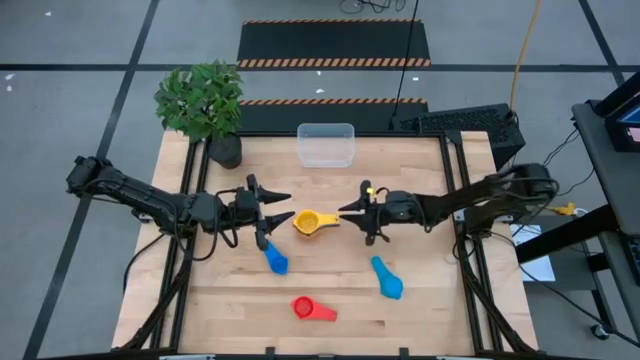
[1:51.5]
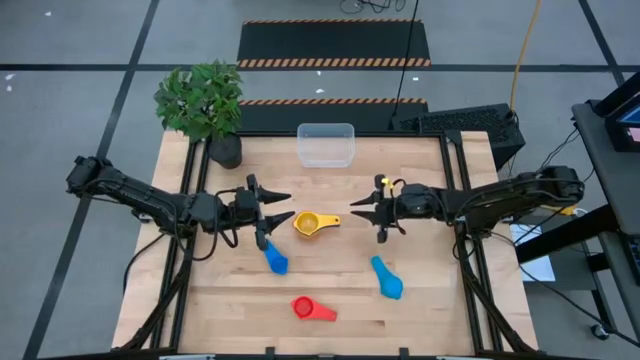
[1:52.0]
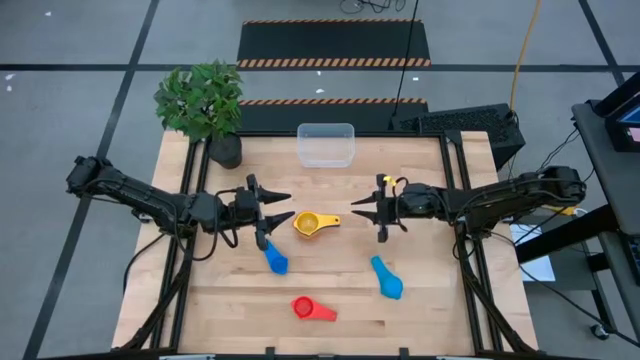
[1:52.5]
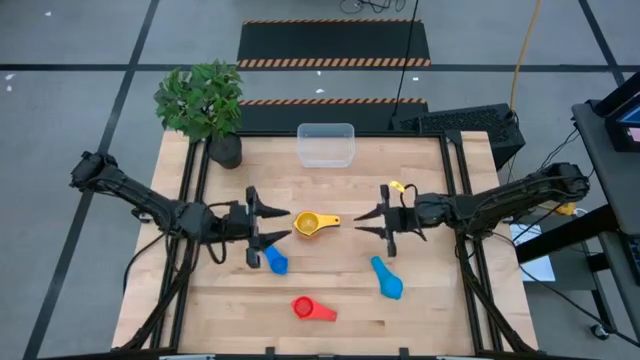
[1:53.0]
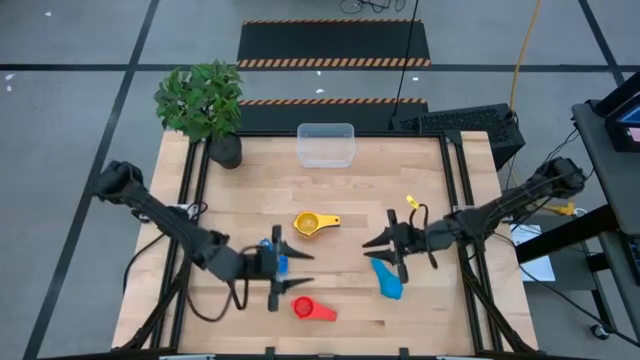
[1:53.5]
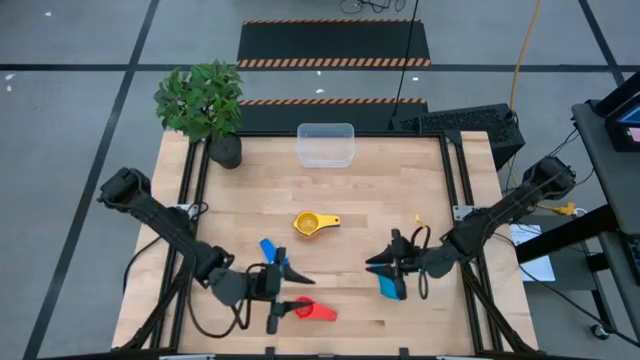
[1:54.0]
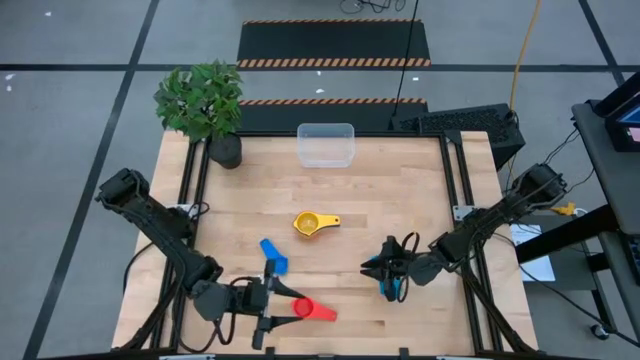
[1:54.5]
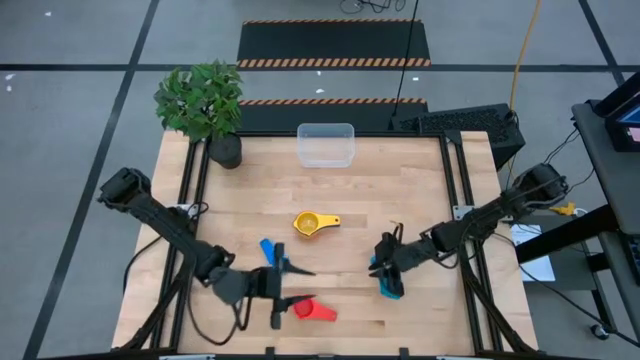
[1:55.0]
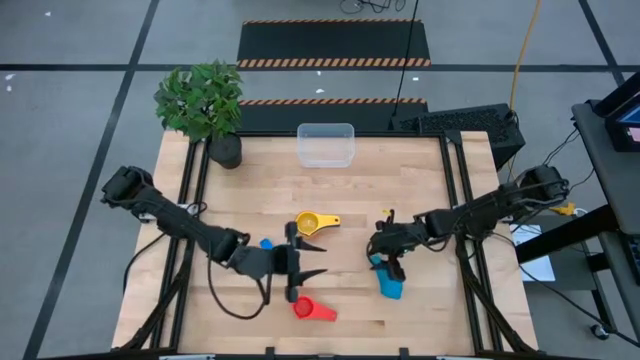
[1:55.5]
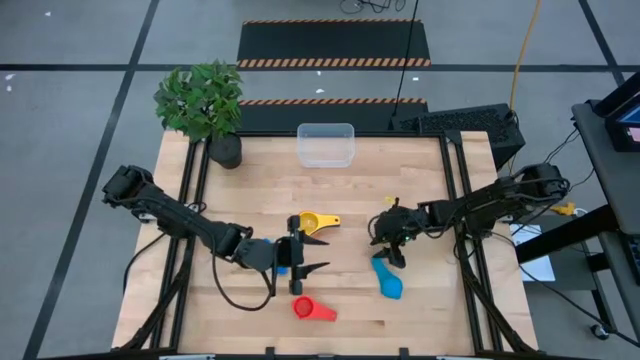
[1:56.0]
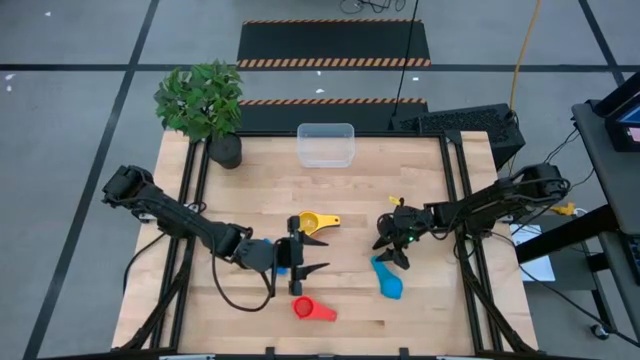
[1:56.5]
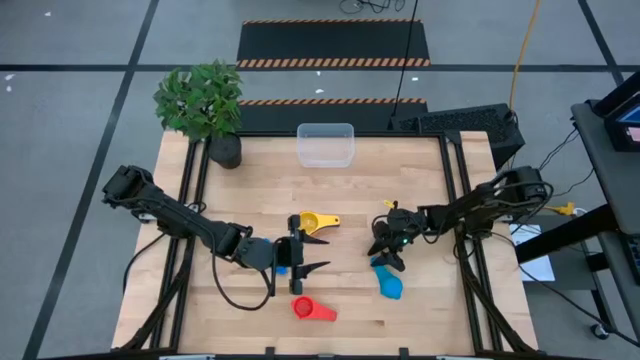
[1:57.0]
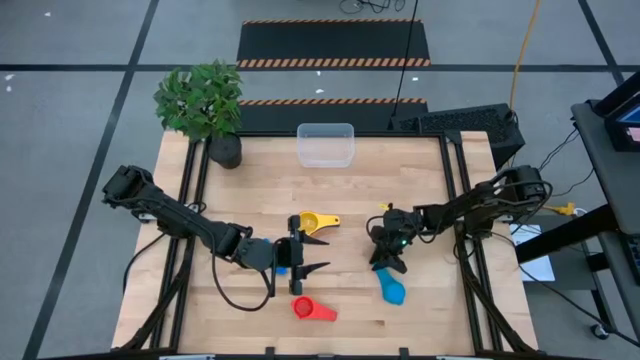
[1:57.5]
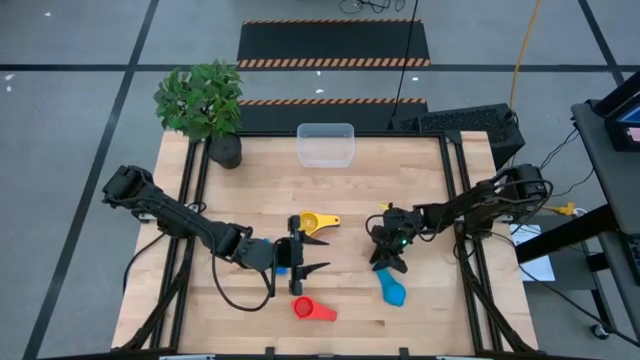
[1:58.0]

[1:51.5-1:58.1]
Task: Nest measuring cups in basket
Stack the light blue measuring cup on top of the yellow measuring cup

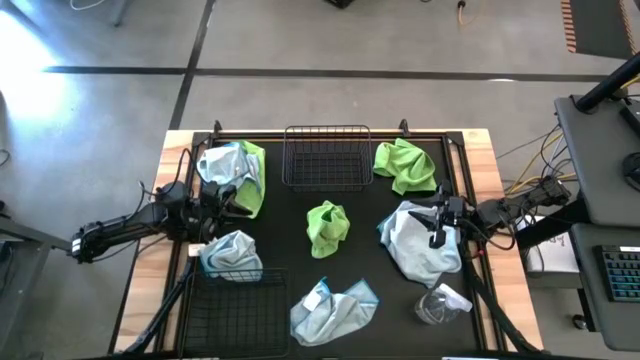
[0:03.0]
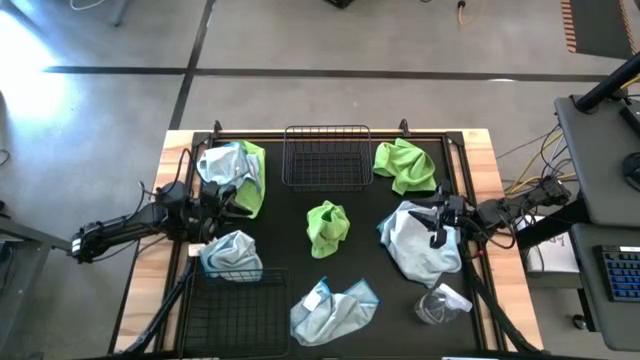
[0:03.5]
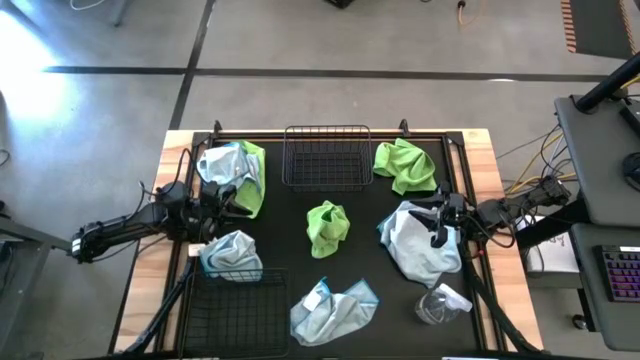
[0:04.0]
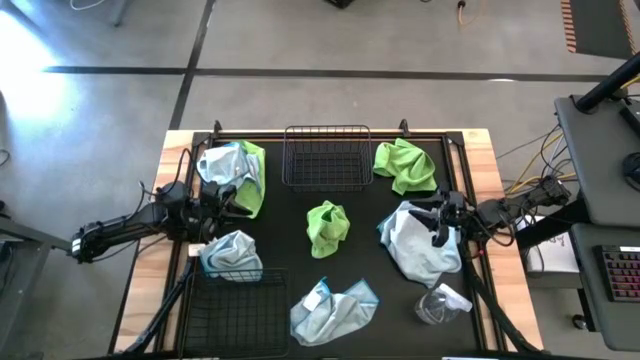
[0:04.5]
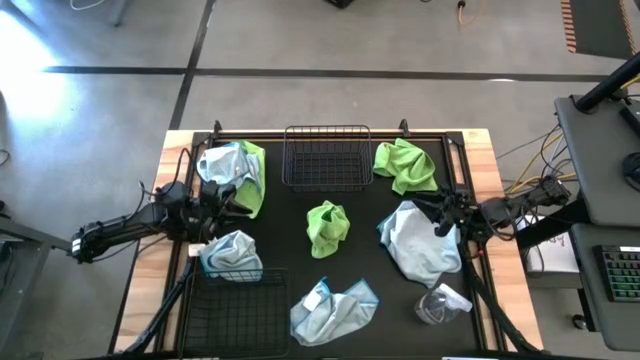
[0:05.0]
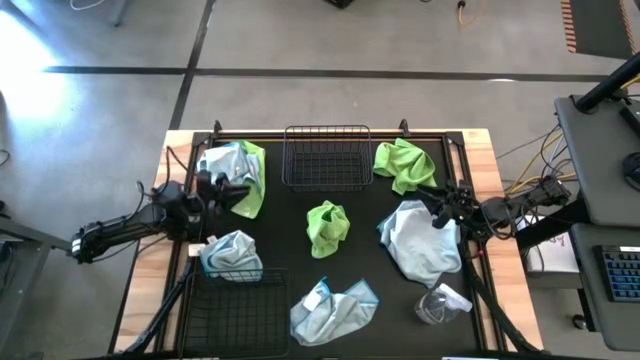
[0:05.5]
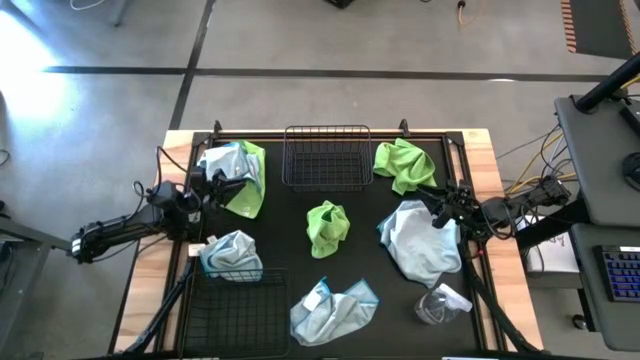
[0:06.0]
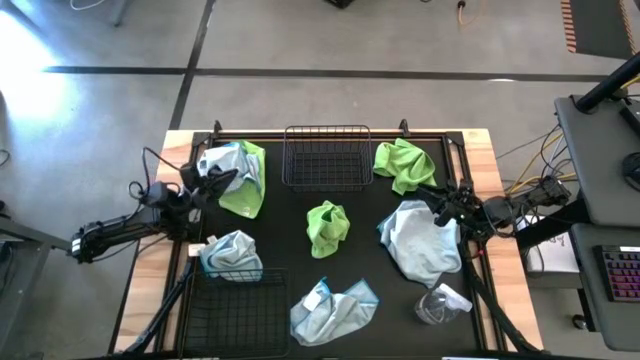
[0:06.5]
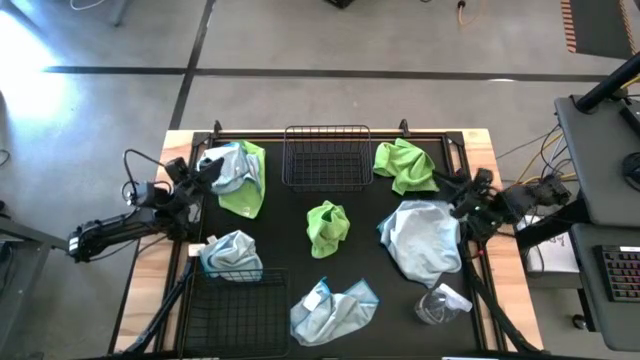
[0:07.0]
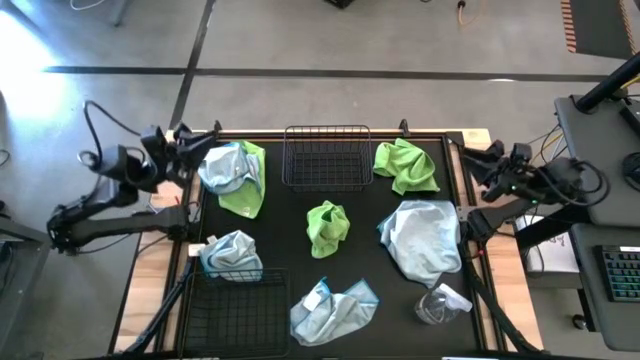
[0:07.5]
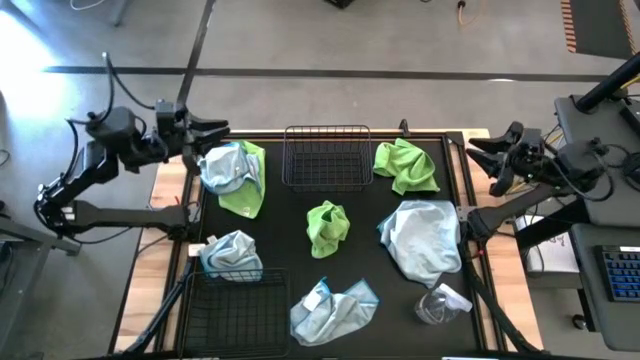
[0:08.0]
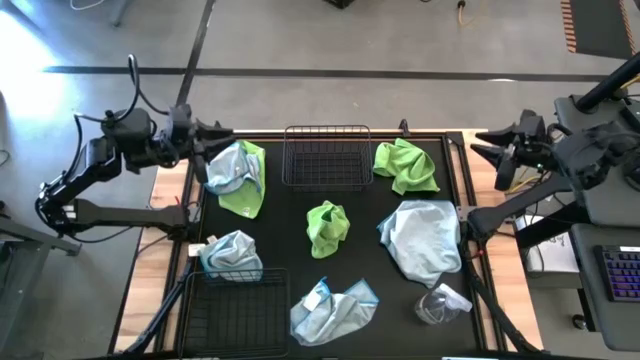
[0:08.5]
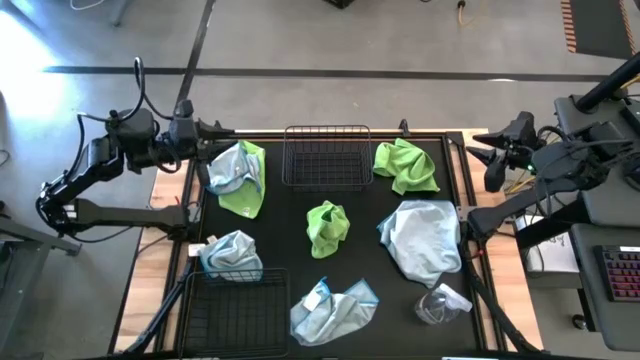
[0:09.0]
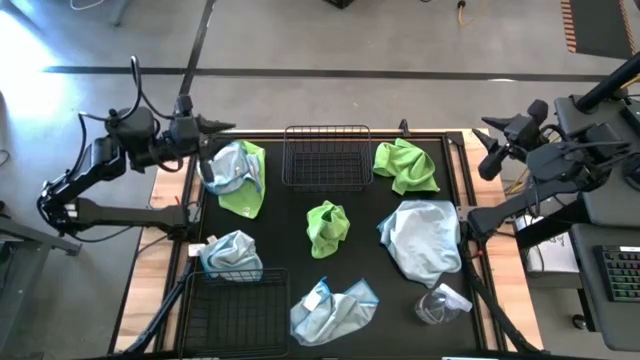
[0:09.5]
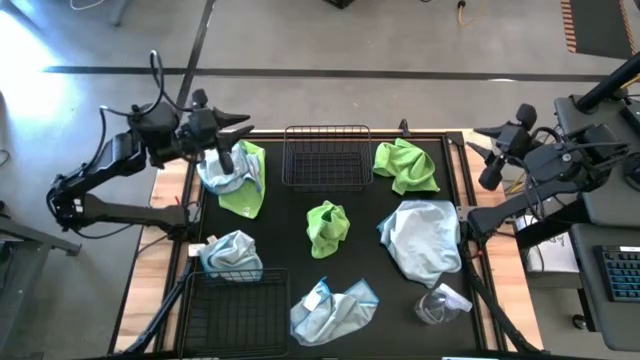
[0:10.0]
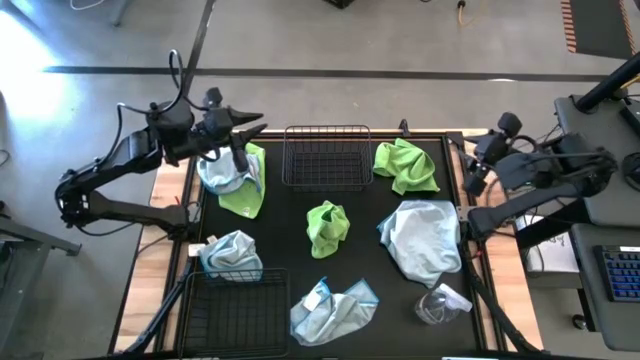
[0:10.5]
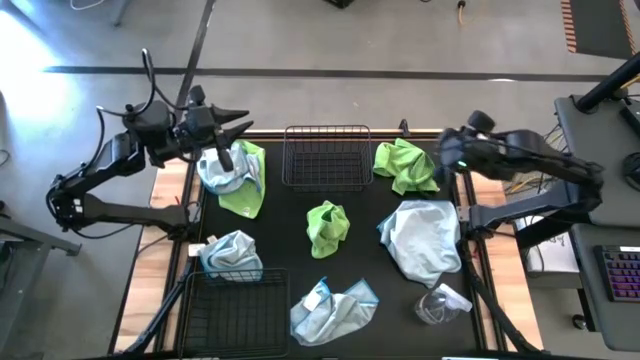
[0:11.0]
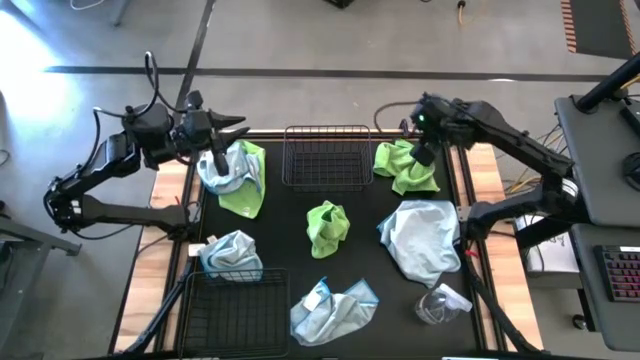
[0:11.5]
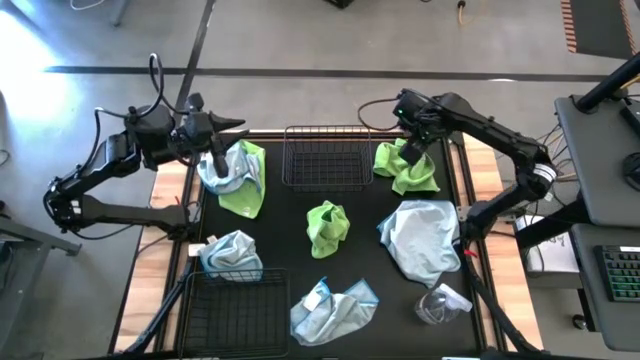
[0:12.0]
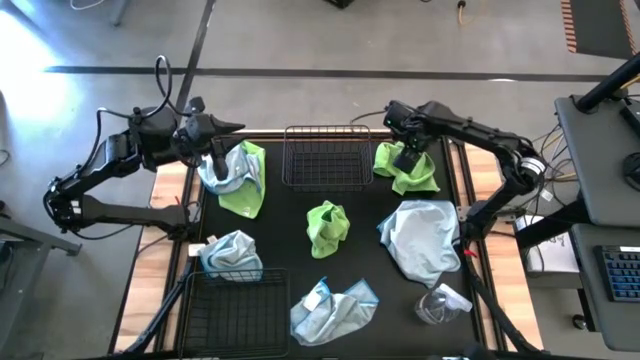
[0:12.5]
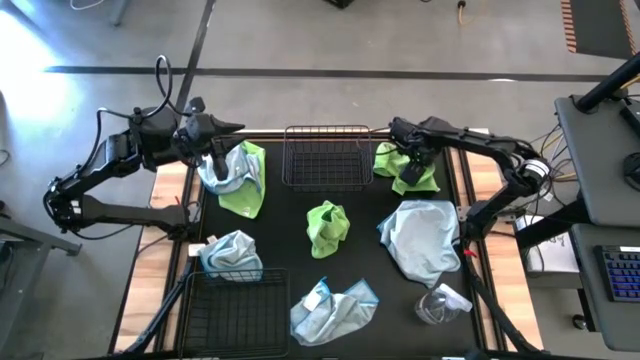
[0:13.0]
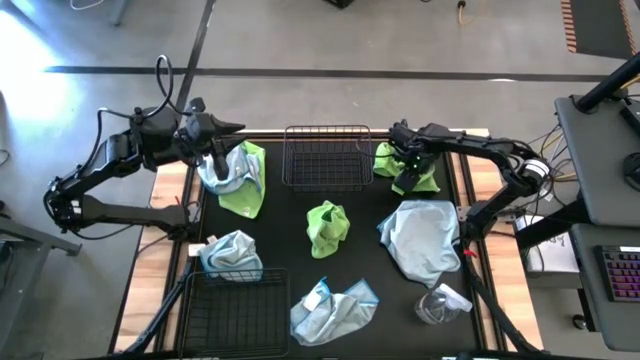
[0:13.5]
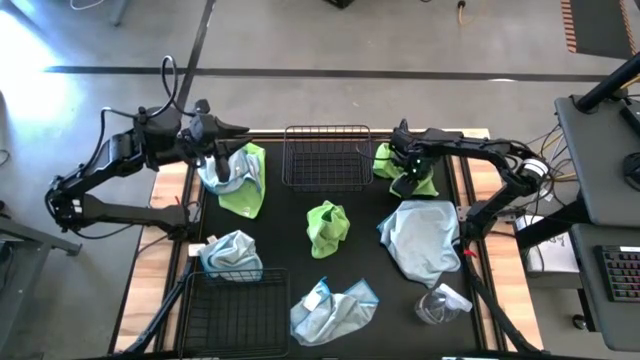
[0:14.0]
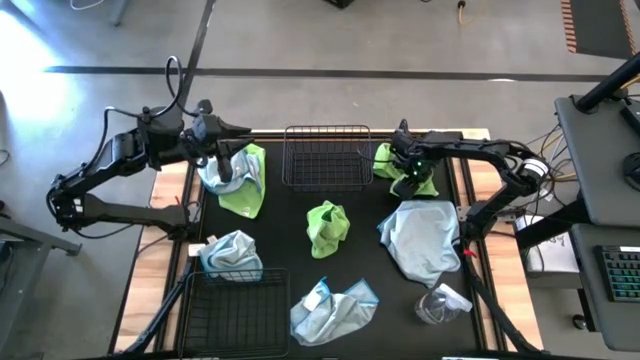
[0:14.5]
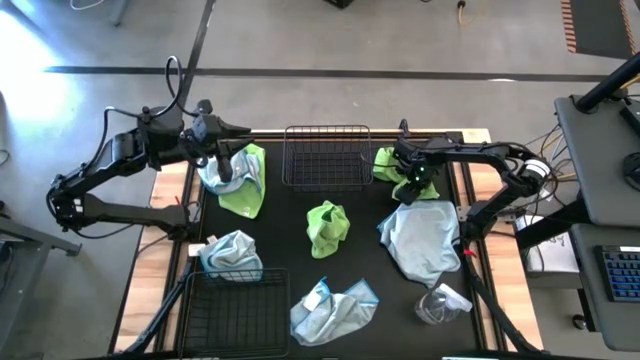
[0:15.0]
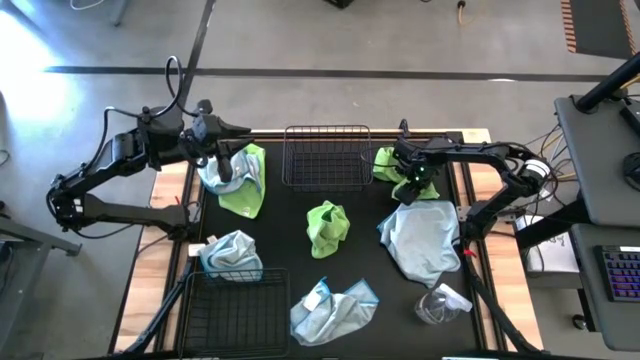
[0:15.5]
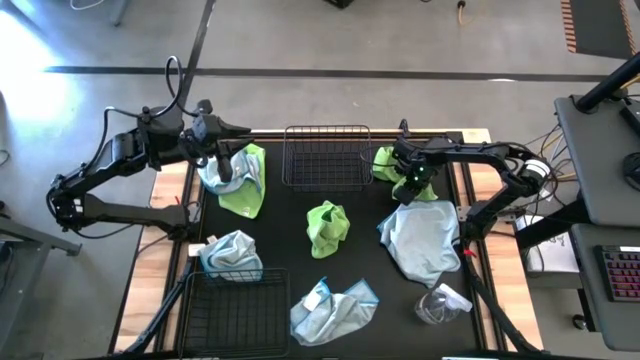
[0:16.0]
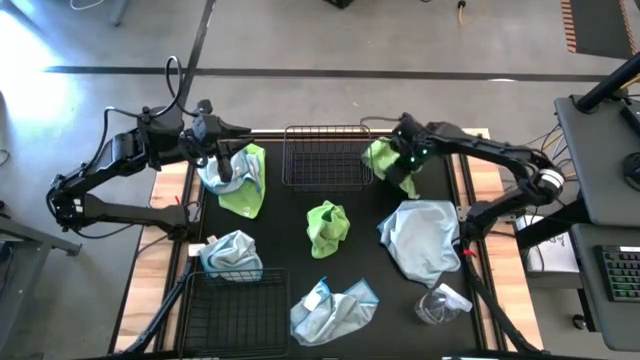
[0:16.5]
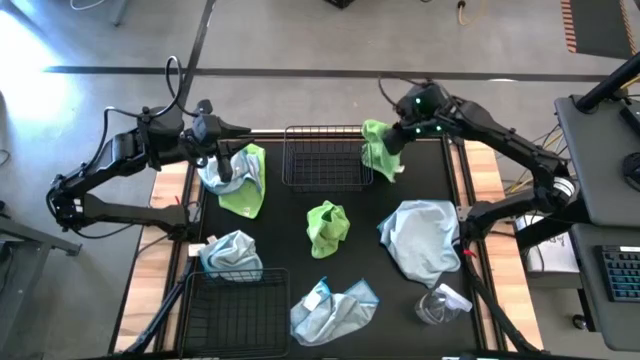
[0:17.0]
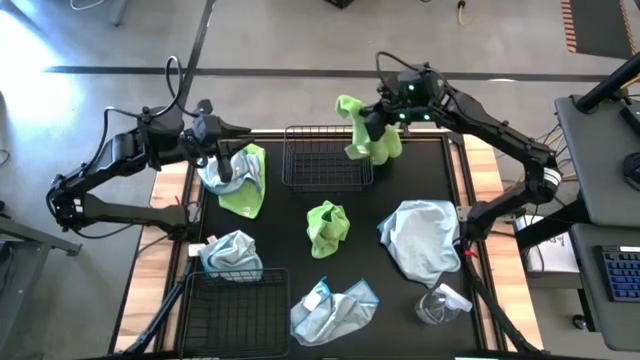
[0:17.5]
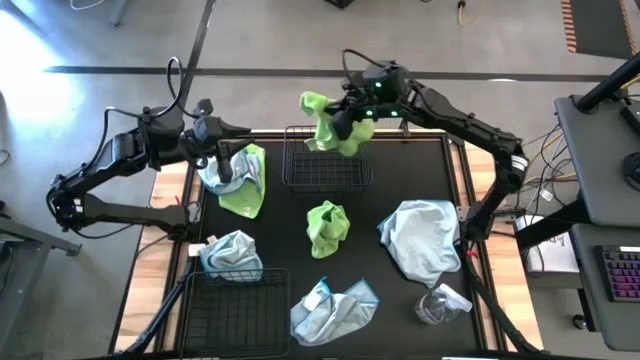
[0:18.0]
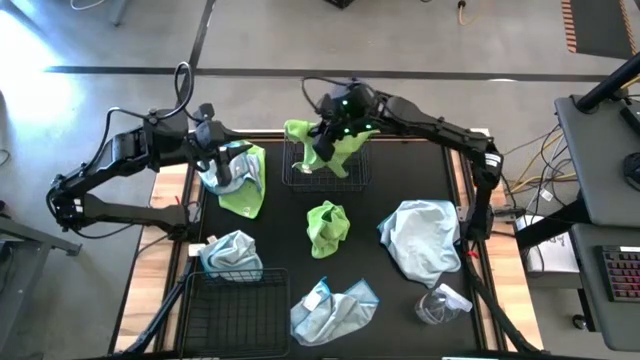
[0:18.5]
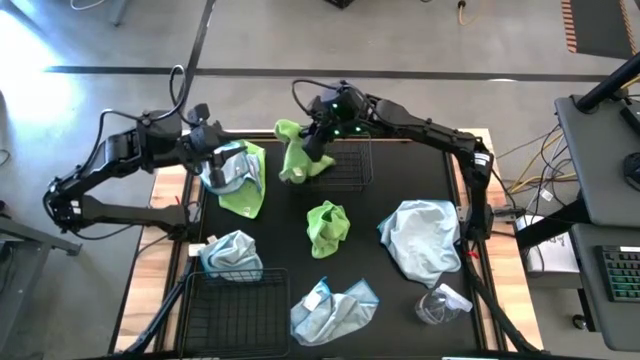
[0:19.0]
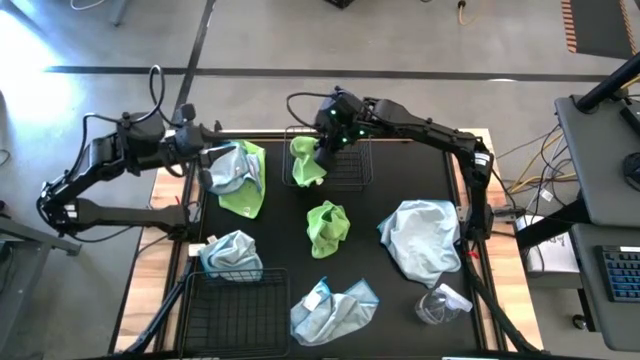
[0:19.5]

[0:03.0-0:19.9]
Task: Sort microfiber towel by color & place in baskets
Put the green microfiber towel into the top black wire basket
